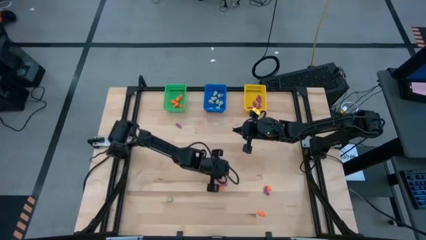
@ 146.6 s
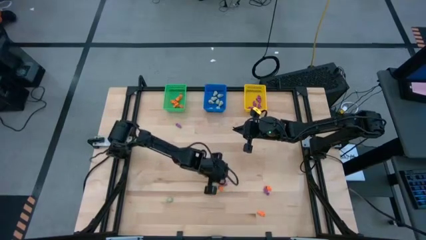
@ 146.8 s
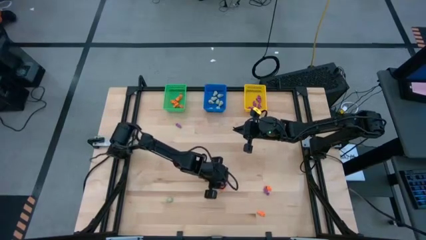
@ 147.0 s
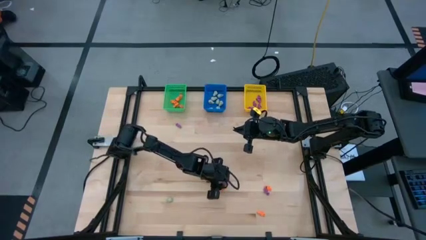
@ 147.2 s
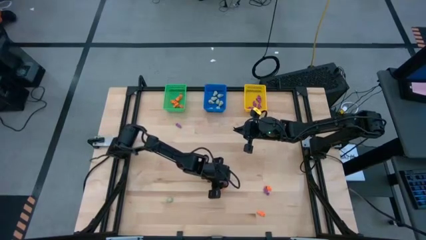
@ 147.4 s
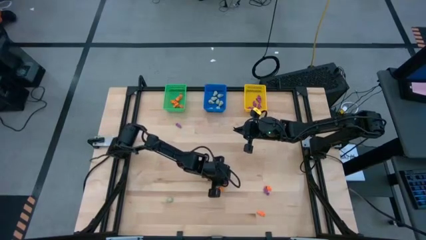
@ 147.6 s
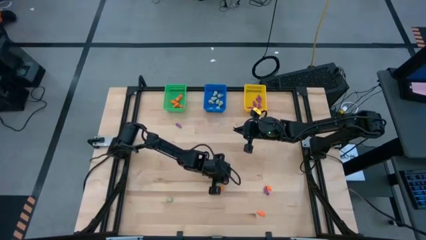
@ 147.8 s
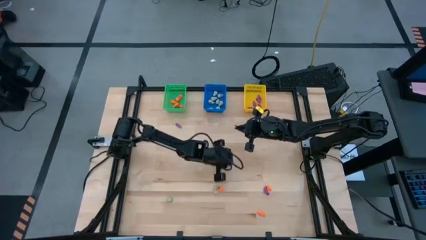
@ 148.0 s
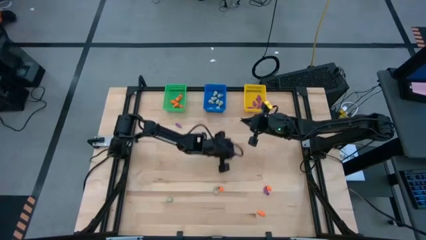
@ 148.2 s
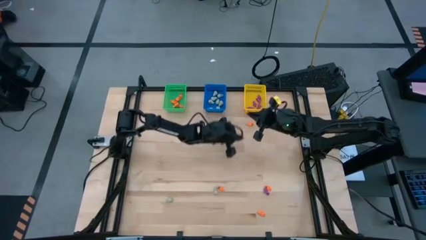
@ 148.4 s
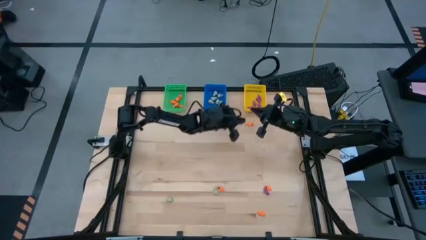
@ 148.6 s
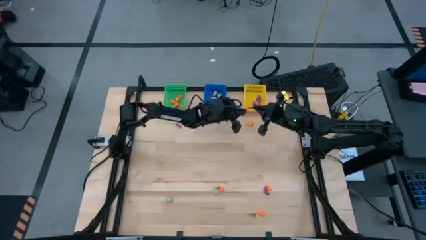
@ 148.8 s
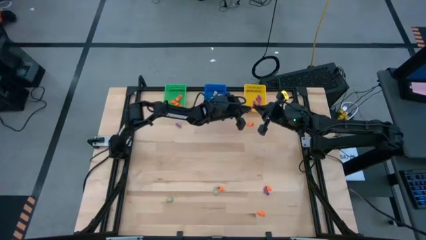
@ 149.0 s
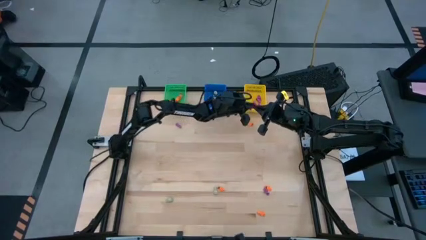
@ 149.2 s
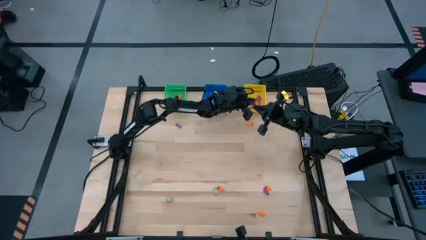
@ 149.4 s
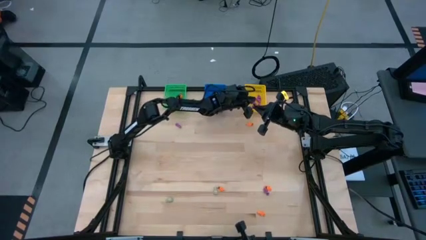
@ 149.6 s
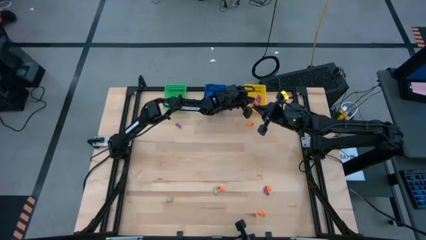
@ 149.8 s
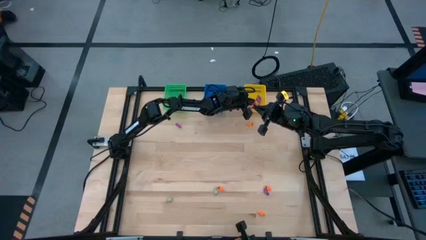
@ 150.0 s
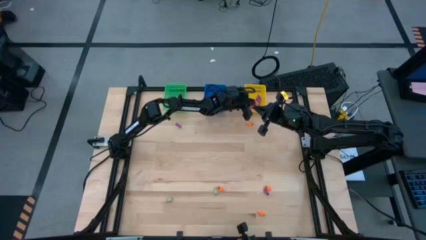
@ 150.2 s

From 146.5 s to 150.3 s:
Task: Sort Halloween decoration
Put the purple skeleton toy into the yellow bin

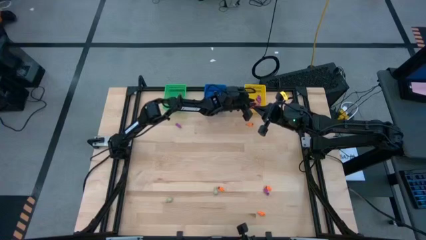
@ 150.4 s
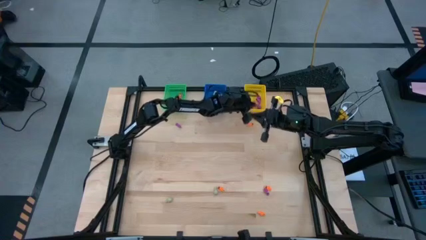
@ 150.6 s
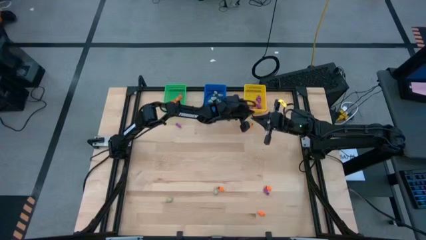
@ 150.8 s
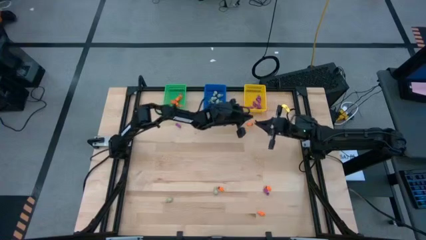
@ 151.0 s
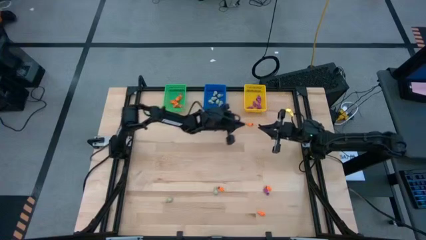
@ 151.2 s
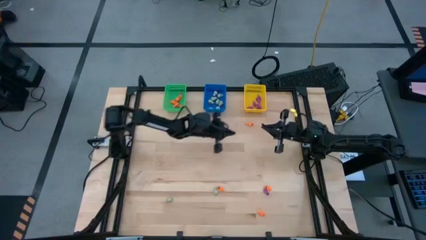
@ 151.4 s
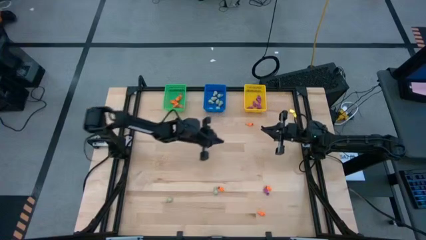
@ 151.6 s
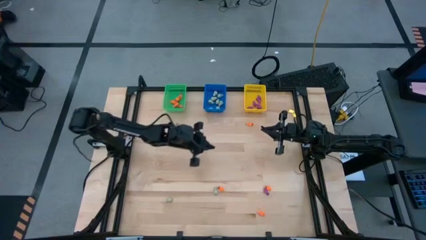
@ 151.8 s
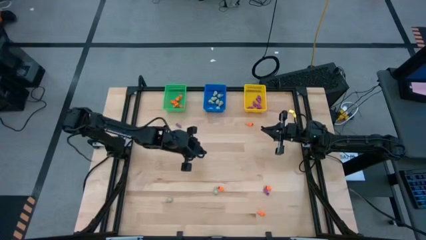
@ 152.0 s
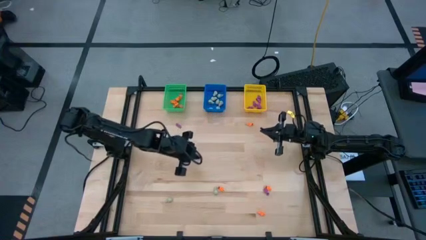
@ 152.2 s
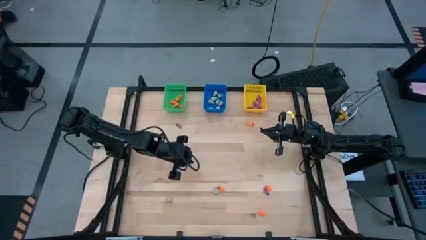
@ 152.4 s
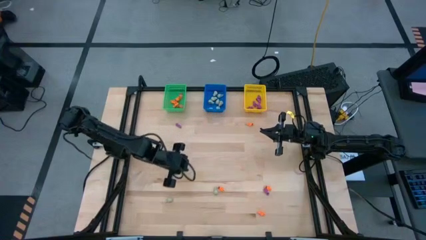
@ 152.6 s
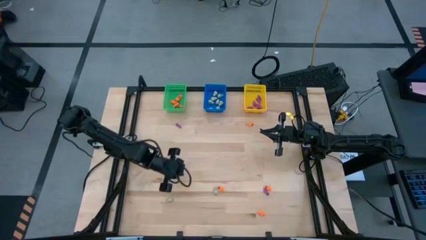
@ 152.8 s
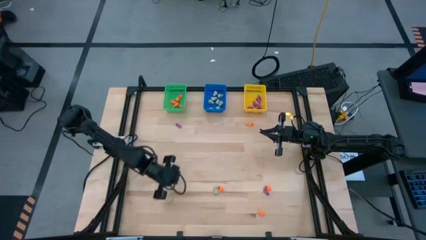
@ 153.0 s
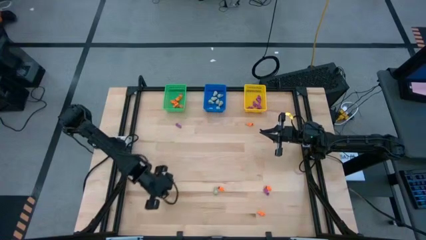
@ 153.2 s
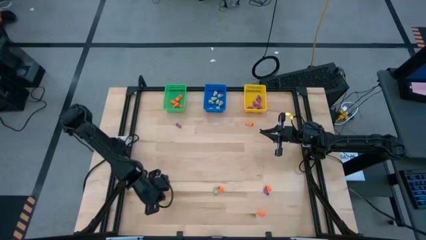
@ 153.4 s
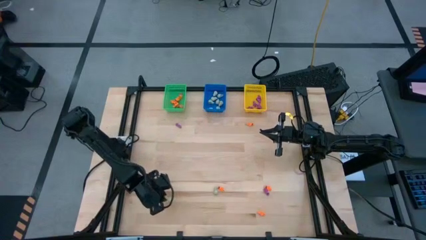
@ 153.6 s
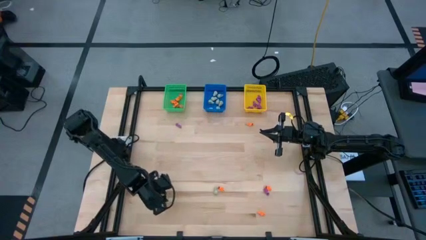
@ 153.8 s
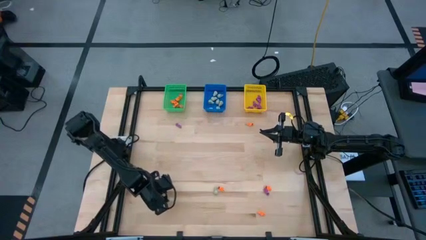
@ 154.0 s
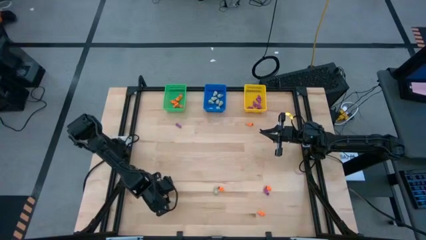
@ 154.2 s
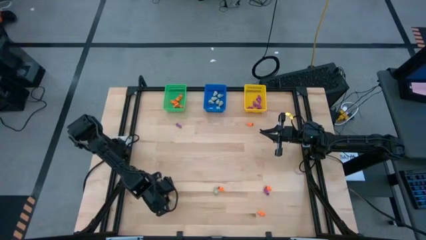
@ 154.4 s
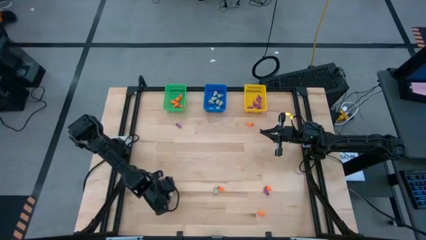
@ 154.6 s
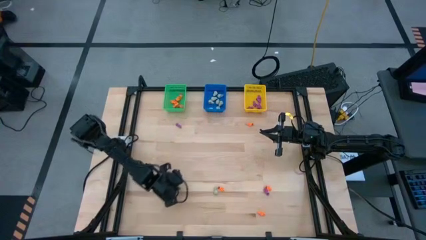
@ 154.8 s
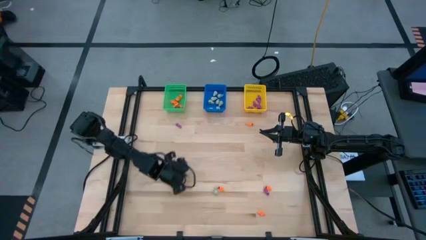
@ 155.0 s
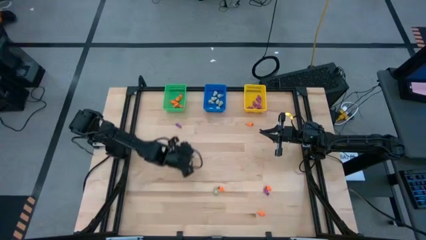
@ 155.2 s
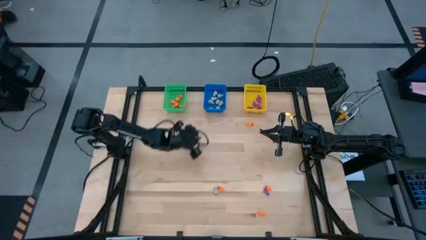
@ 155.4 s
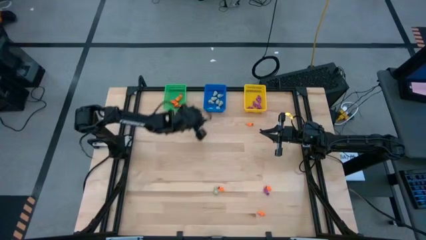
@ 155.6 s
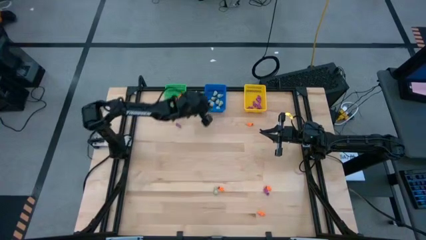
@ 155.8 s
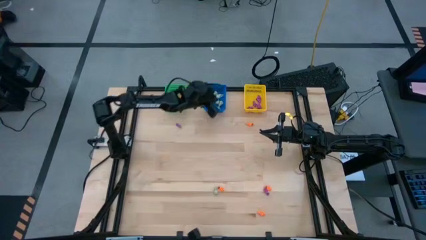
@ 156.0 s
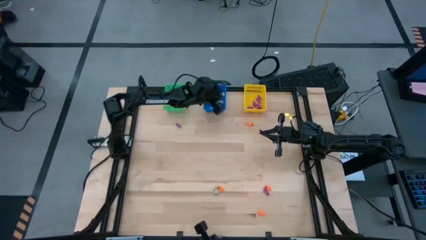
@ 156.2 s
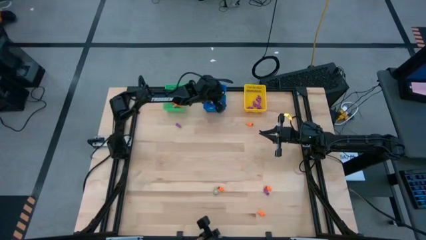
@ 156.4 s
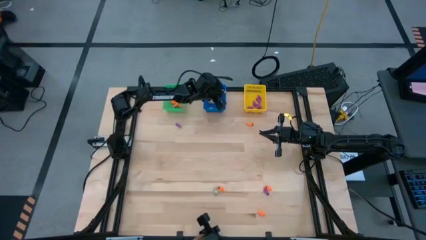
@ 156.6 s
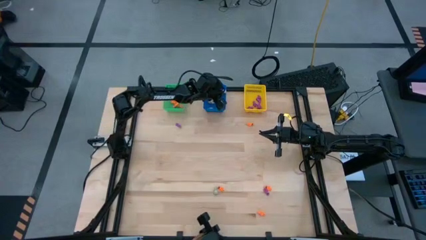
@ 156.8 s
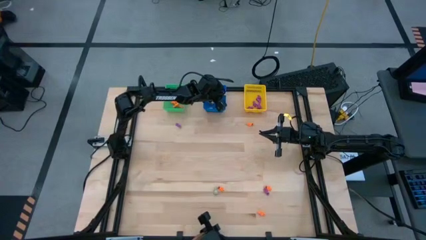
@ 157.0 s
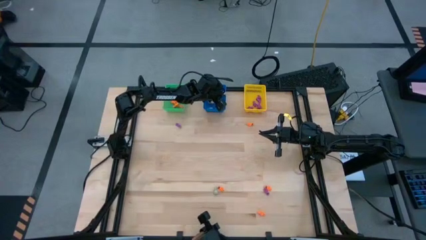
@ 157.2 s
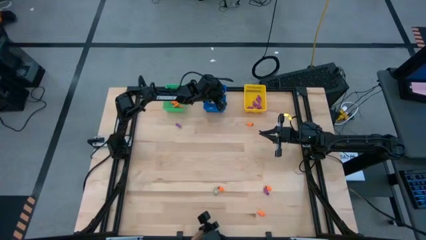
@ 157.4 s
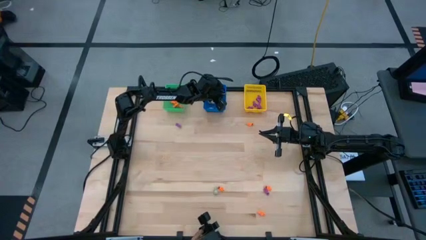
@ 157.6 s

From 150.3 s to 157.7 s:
Put the white skull toy into the blue bin

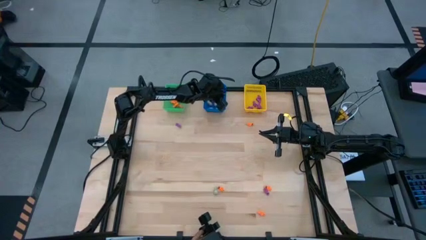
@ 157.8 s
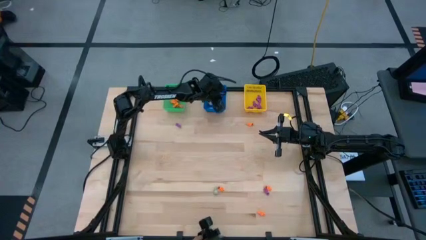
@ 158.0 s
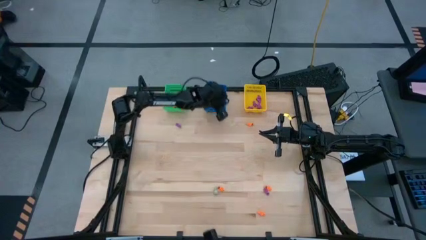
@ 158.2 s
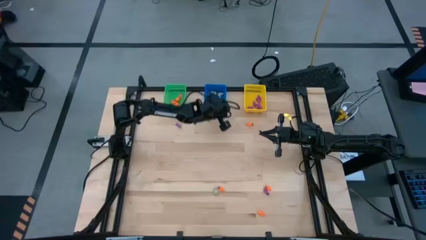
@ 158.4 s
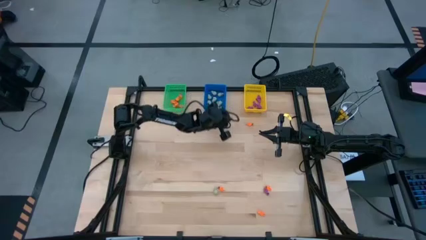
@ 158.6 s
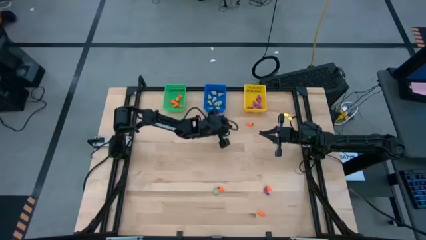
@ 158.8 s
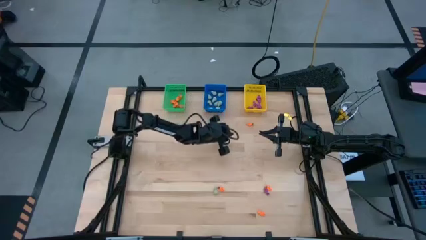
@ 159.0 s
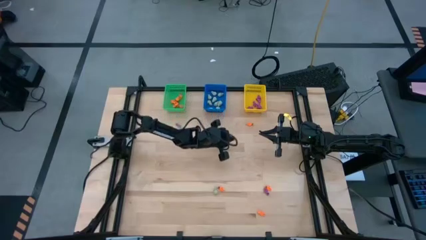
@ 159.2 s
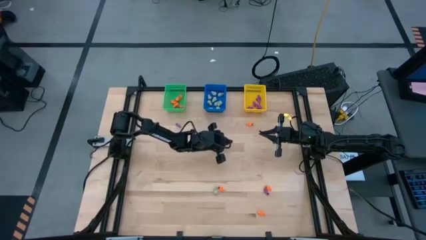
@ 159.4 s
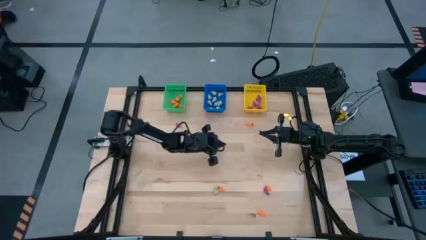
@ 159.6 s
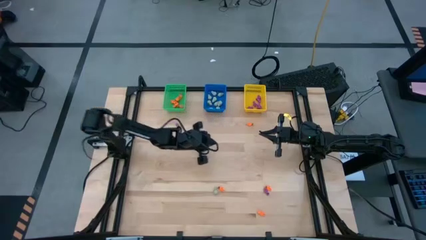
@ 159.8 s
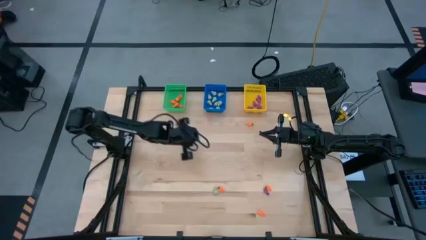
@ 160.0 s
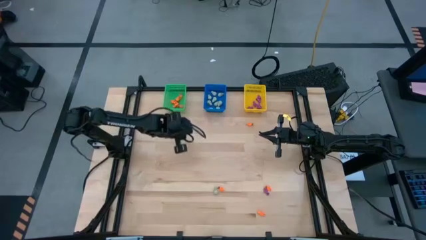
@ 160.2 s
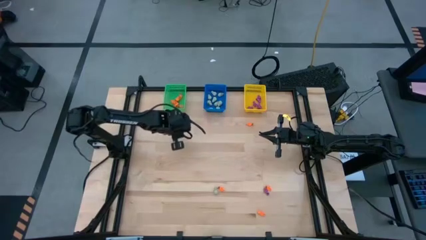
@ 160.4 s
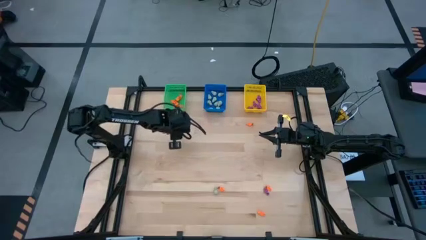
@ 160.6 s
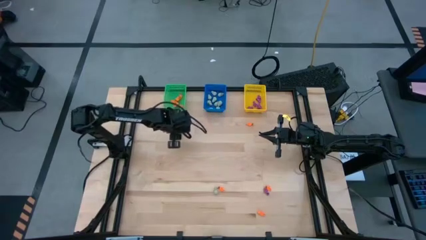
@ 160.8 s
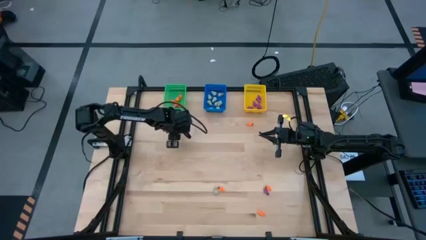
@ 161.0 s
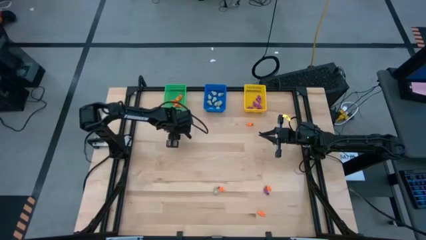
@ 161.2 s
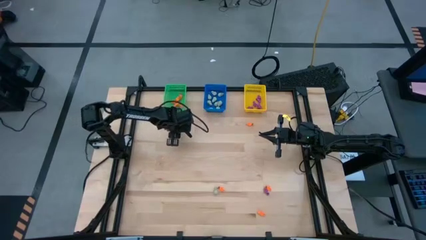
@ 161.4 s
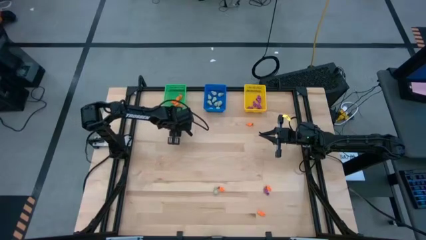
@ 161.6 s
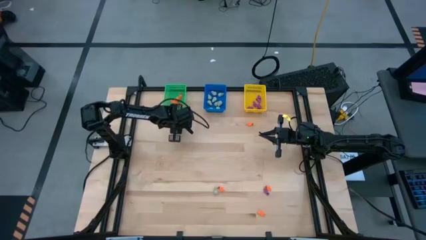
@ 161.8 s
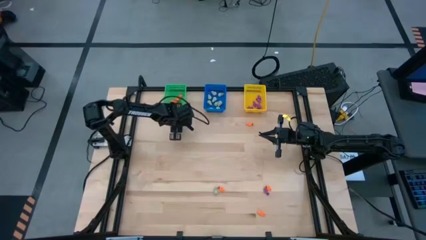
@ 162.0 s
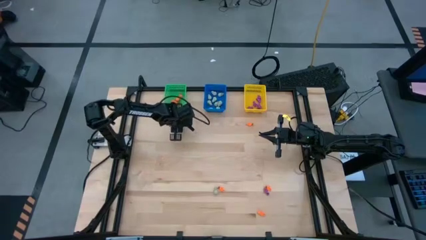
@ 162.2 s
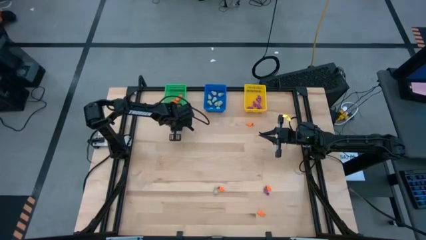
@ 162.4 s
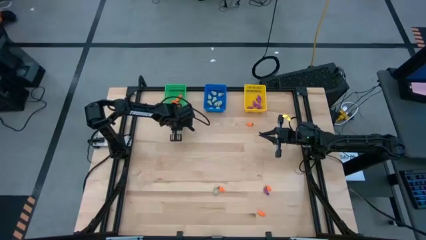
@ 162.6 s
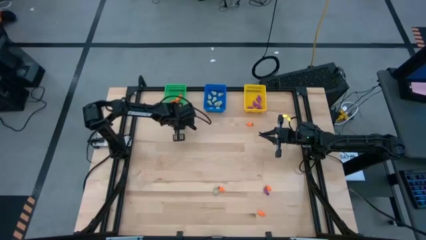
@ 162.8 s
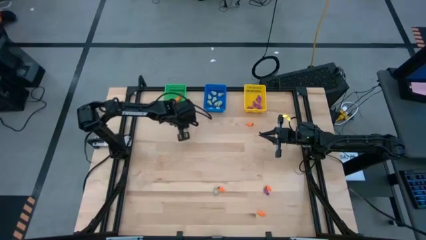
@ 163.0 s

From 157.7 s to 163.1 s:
Put the purple skeleton toy into the yellow bin
